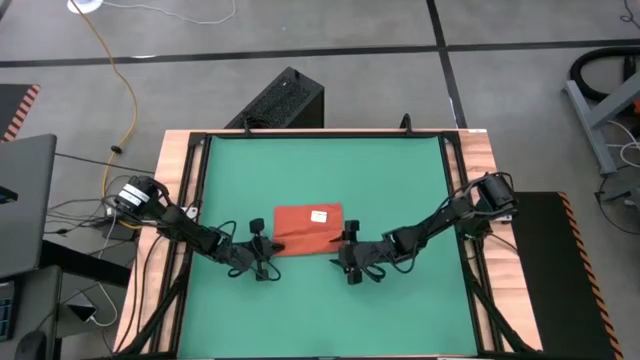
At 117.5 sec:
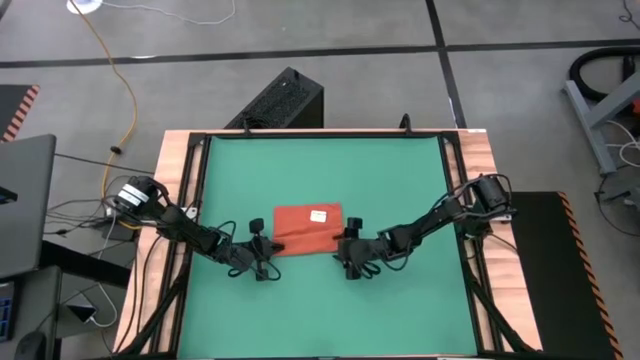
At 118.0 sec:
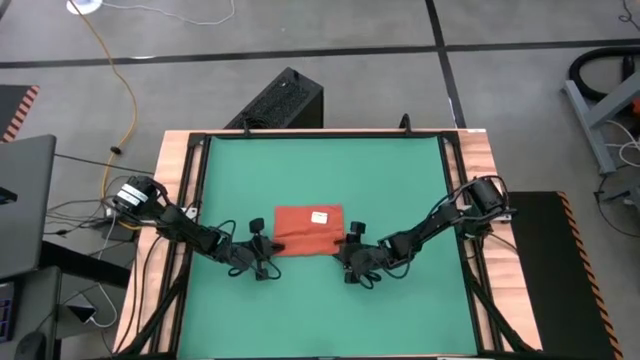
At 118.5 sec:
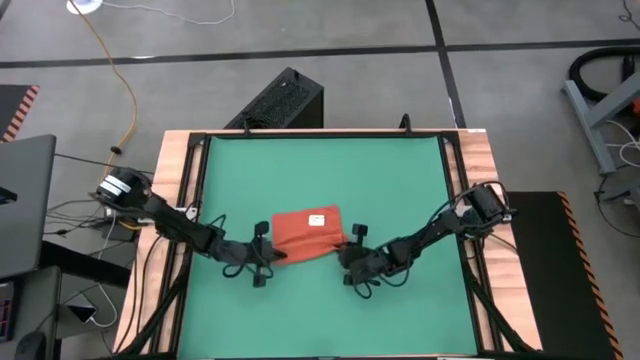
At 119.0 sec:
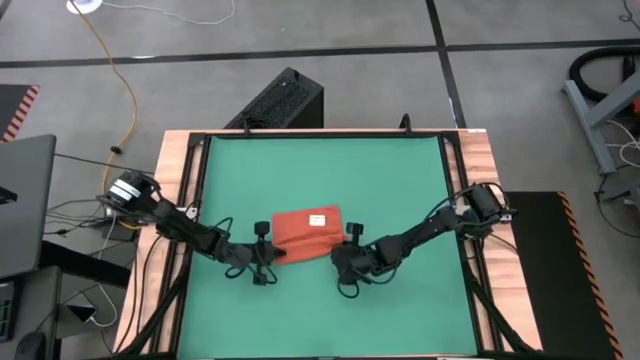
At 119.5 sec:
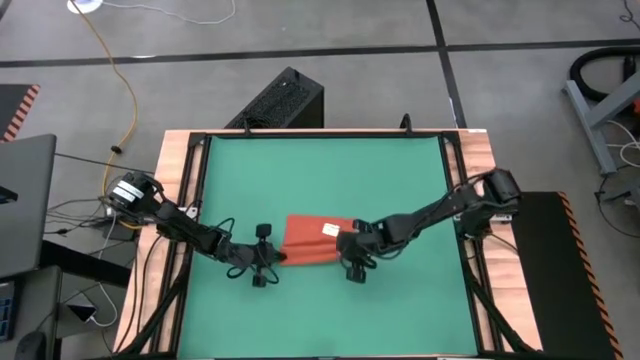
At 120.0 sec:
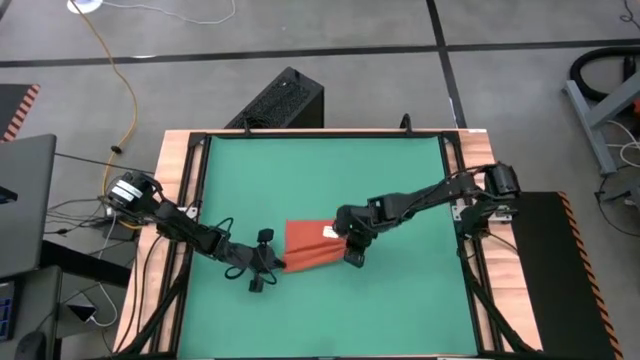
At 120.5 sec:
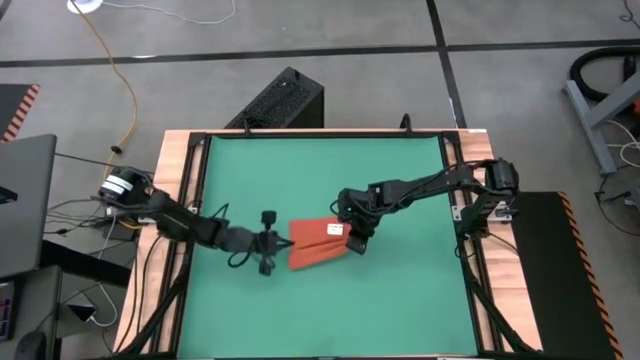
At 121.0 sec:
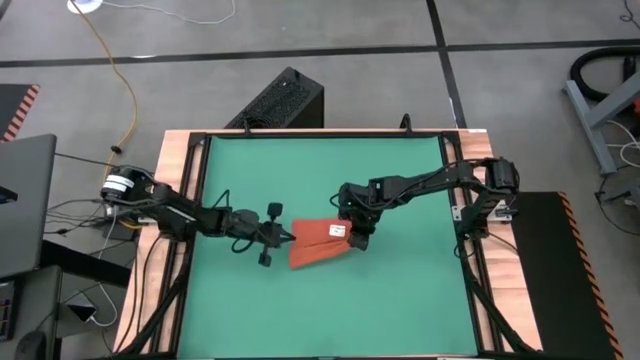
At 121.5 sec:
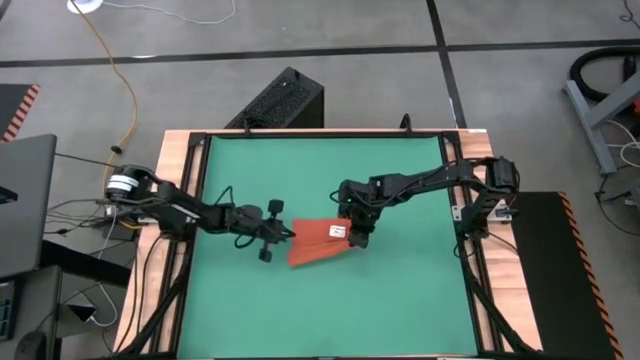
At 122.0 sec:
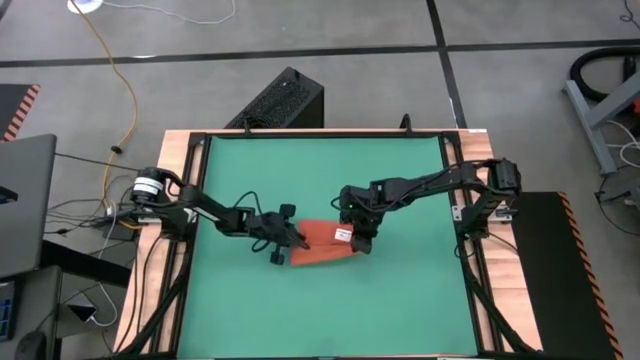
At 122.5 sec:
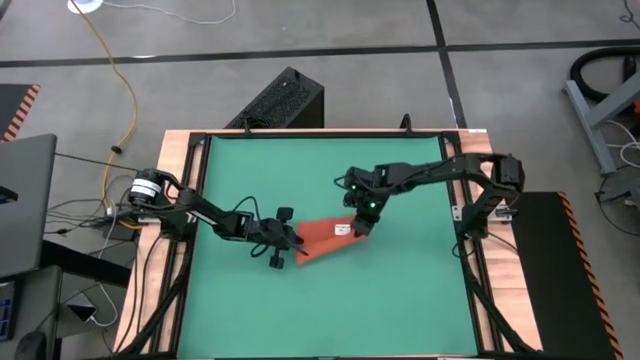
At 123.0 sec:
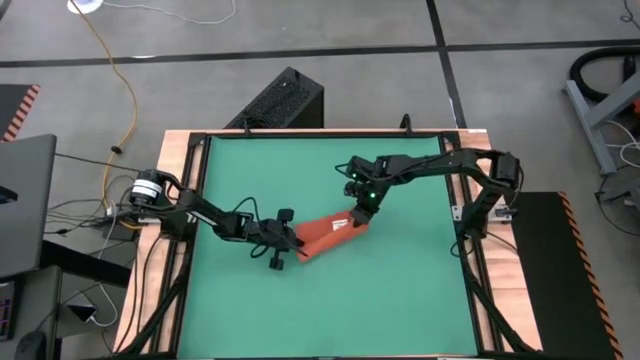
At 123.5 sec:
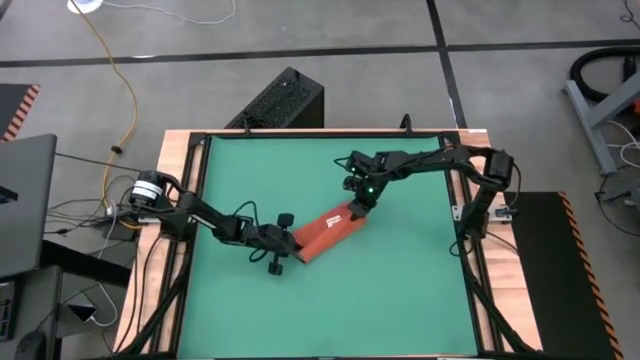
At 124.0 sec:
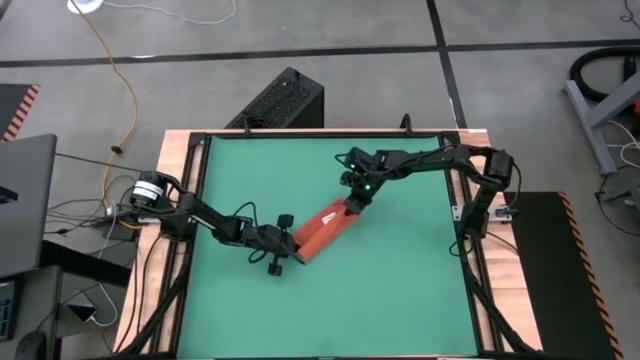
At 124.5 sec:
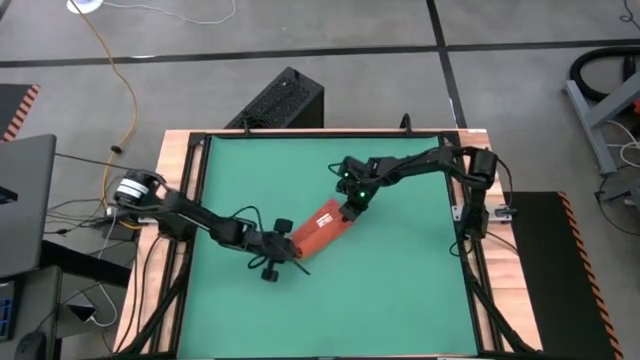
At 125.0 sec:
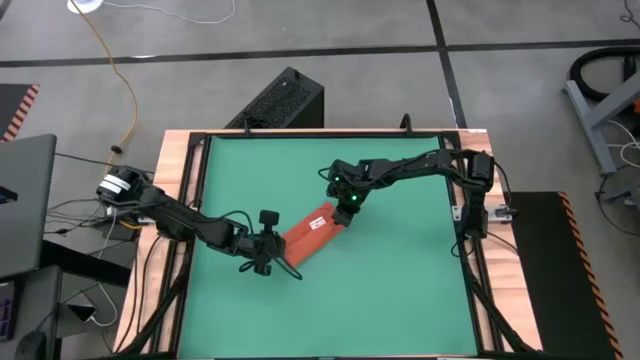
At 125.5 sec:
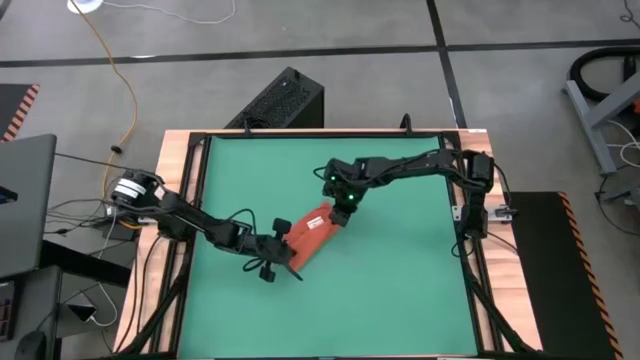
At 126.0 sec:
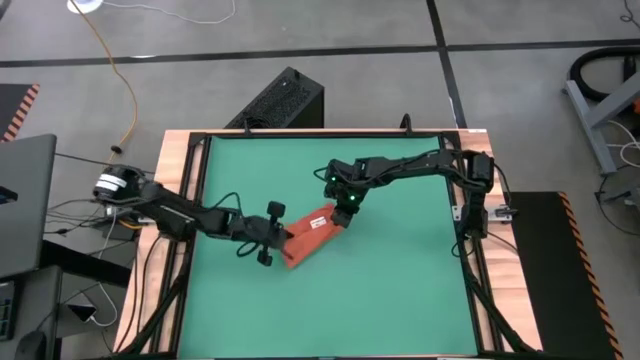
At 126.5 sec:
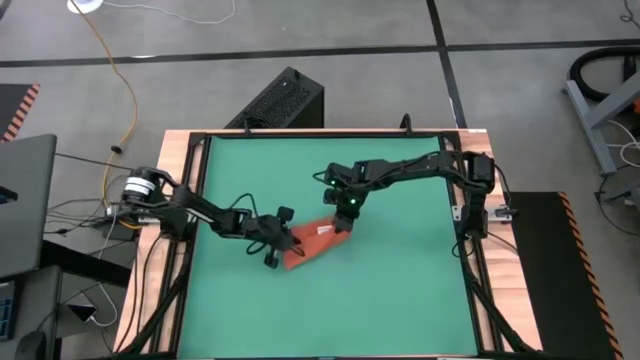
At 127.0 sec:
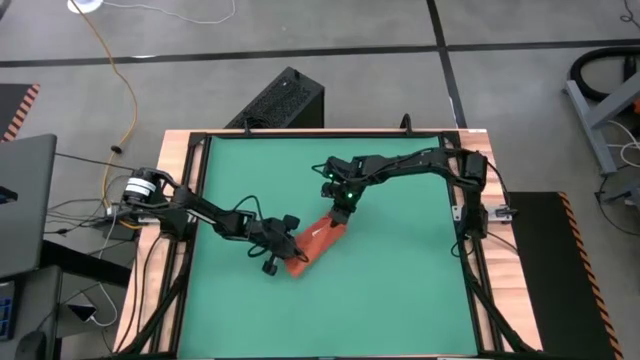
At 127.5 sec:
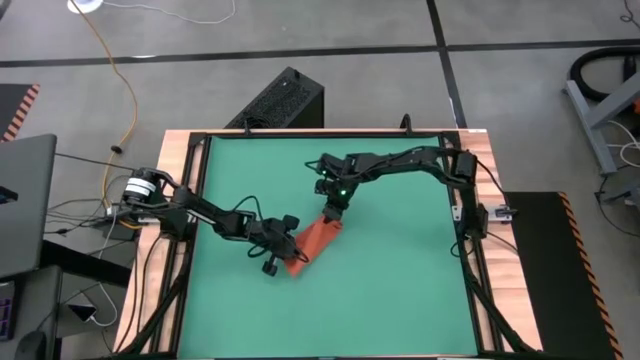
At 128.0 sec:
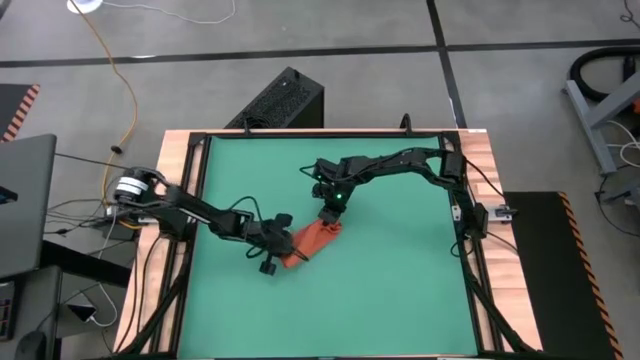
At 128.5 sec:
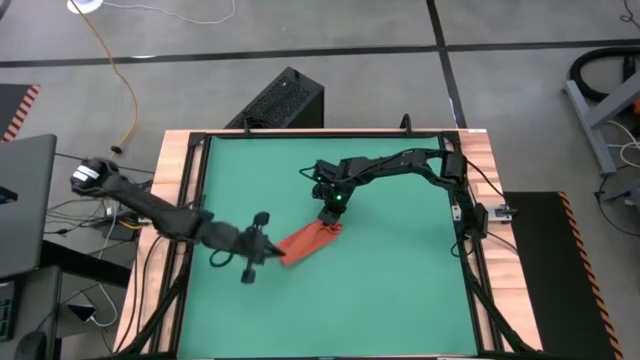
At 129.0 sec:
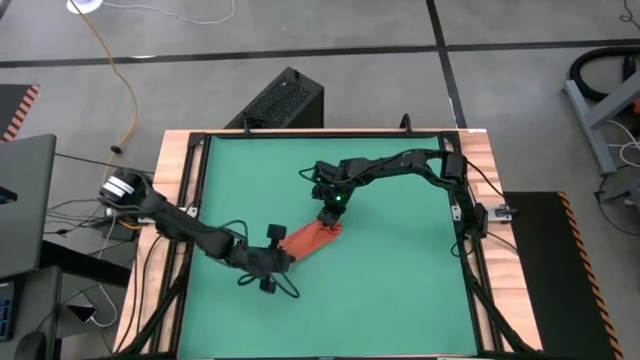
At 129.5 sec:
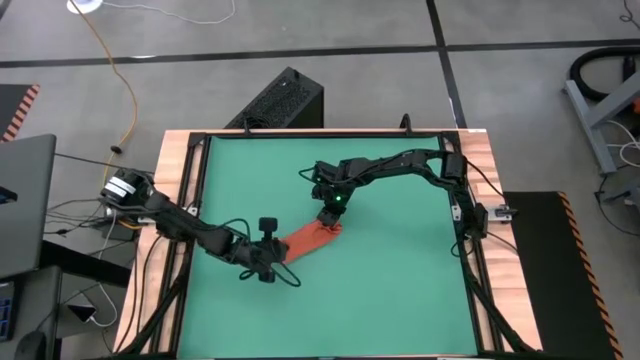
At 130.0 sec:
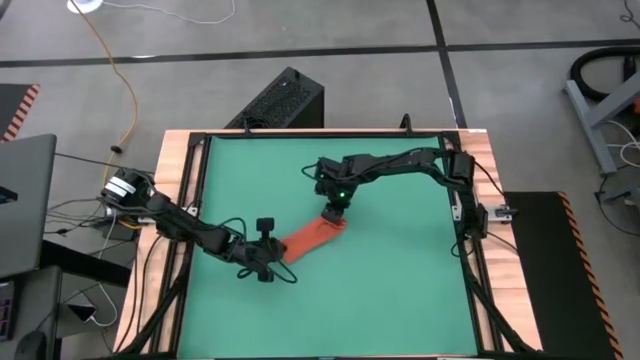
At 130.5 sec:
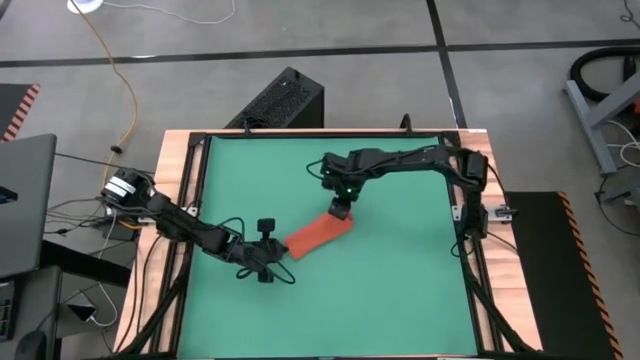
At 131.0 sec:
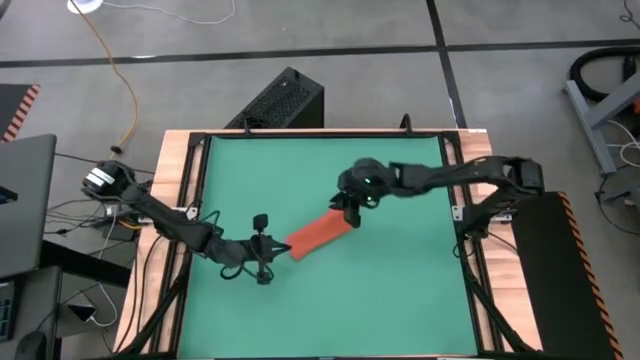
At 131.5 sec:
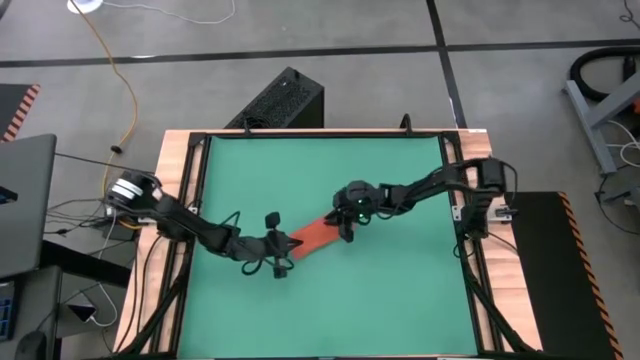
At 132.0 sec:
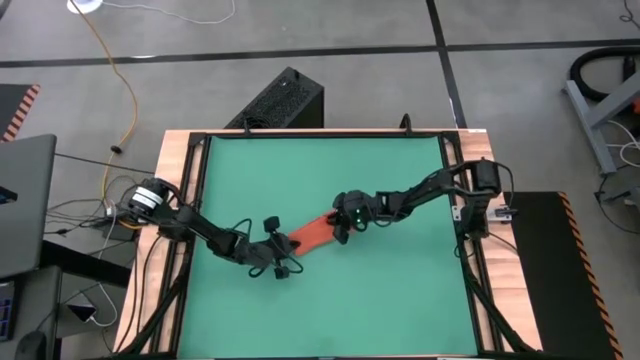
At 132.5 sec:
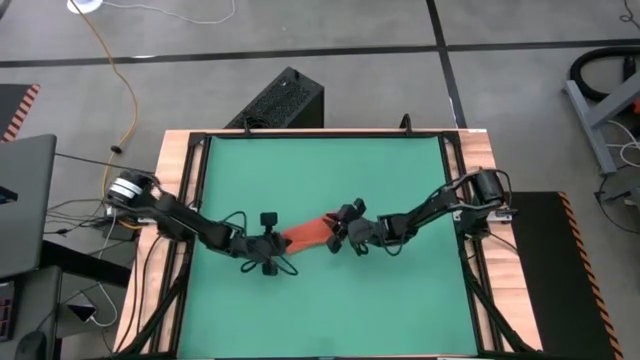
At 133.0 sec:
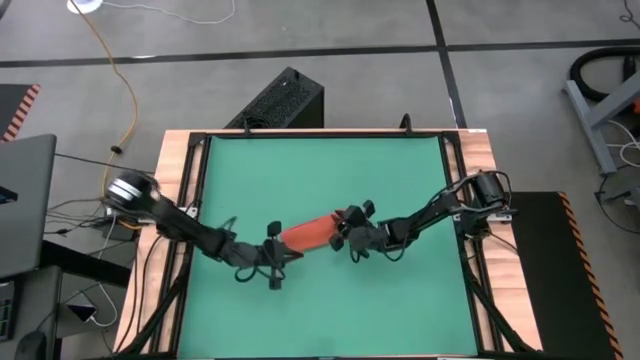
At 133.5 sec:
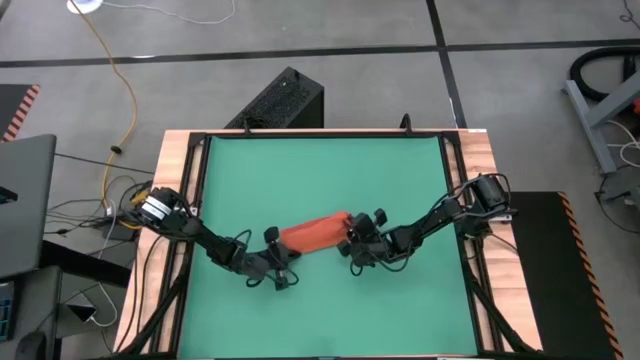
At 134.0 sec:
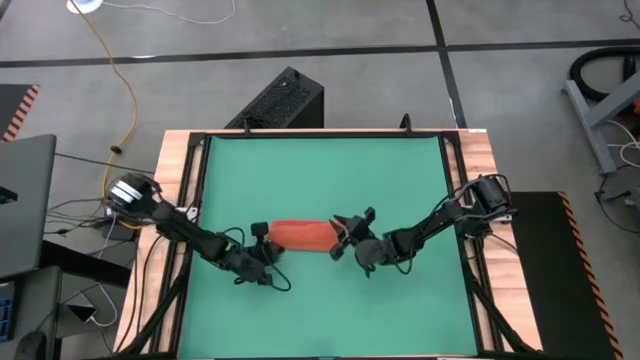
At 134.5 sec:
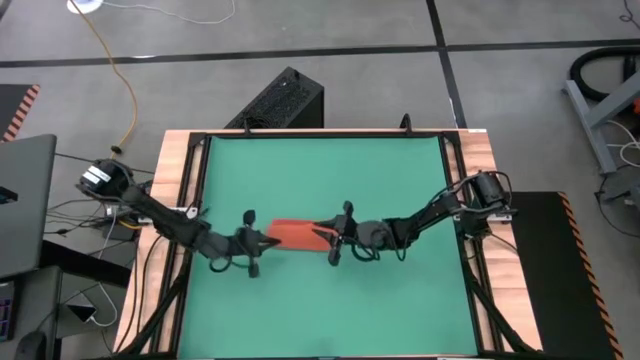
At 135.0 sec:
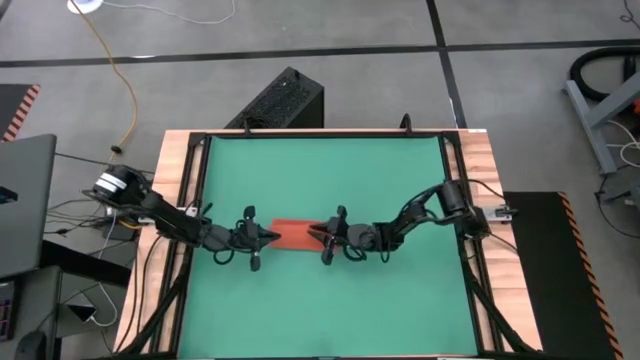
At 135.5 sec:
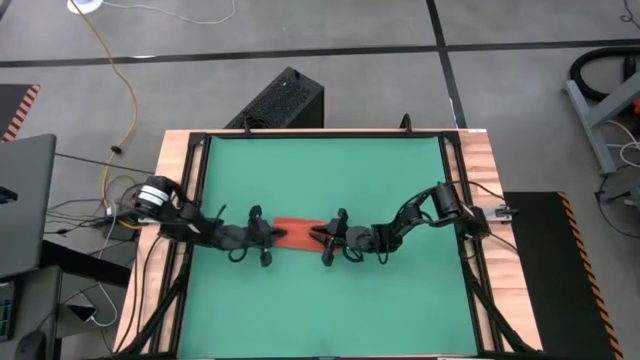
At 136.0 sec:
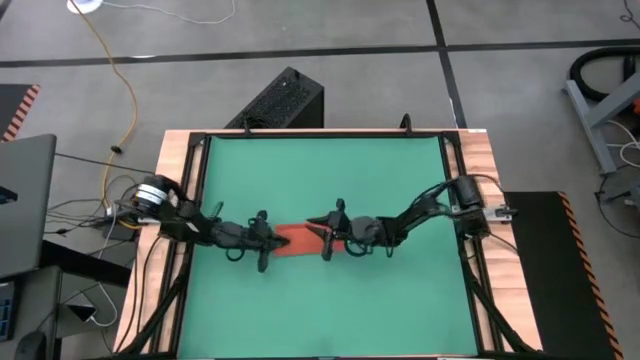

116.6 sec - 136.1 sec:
Task: Roll towel
Roll the orange towel

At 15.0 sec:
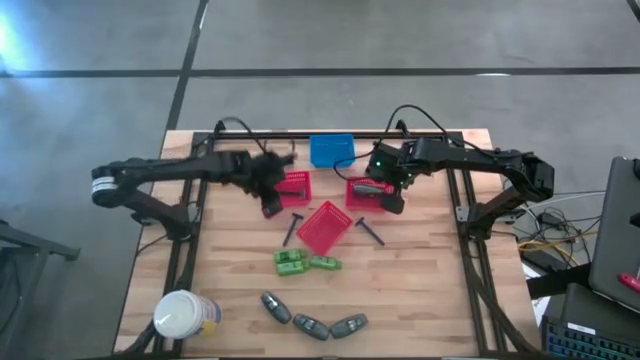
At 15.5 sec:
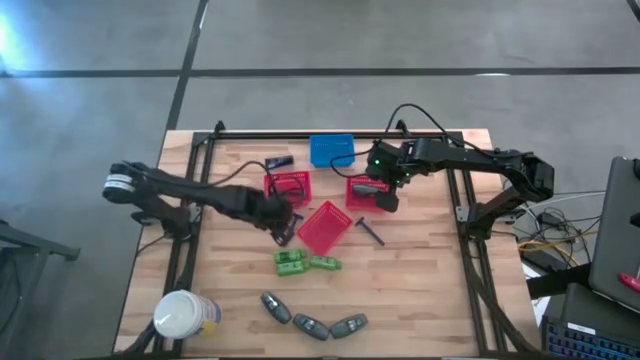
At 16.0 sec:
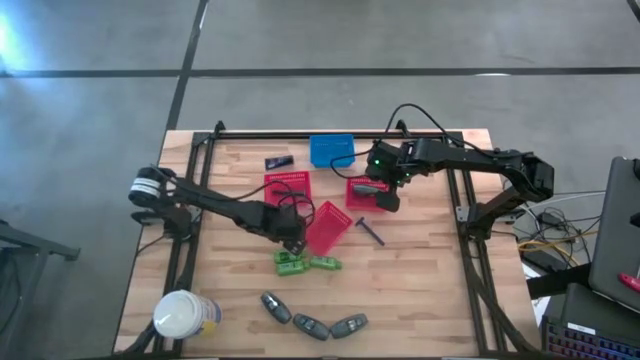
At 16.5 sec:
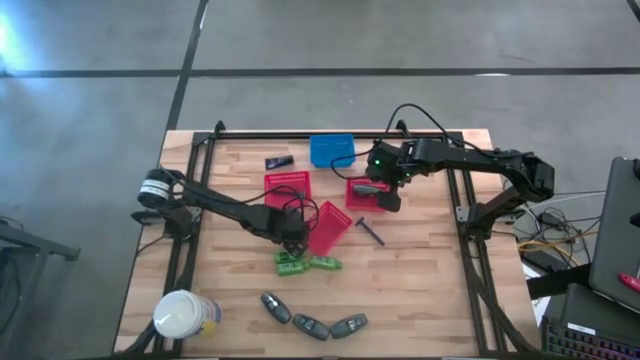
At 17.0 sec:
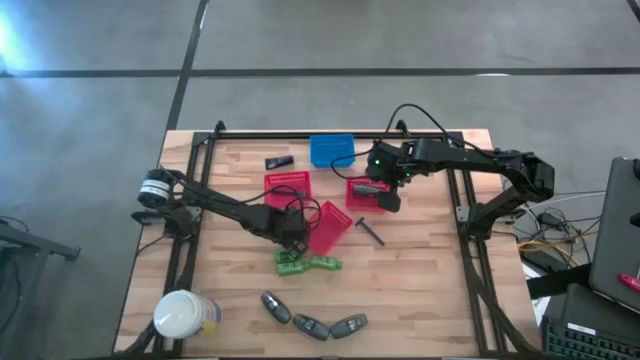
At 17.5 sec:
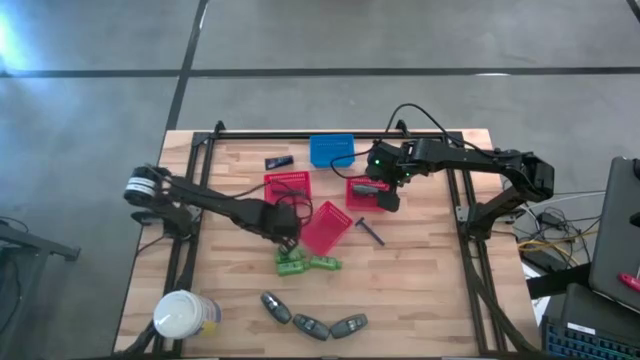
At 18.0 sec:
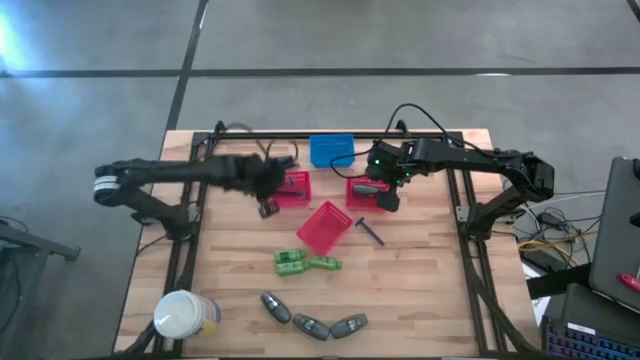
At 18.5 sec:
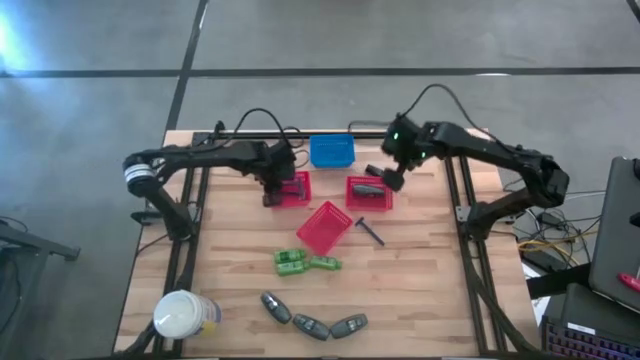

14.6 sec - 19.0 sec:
Task: Pick & Place Travel size toiletries
Put the blue razor into the top left red bin
